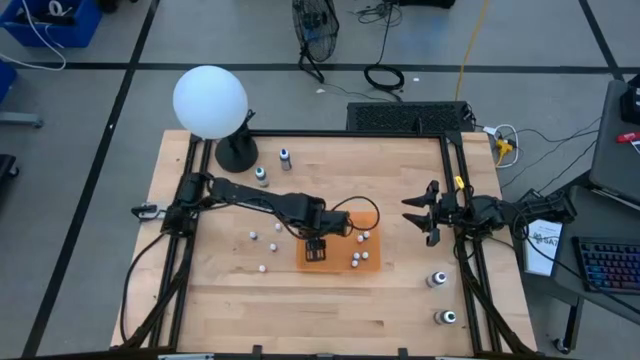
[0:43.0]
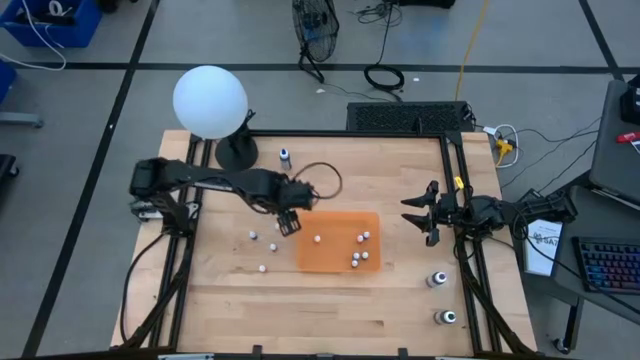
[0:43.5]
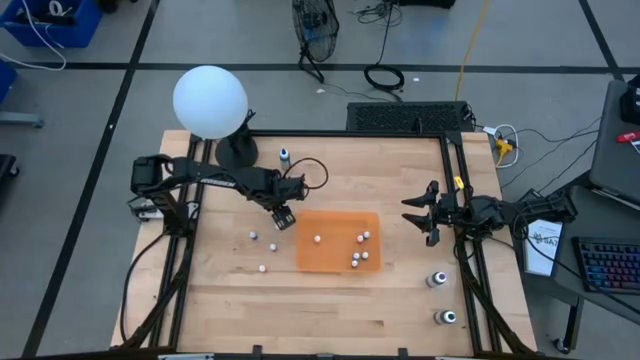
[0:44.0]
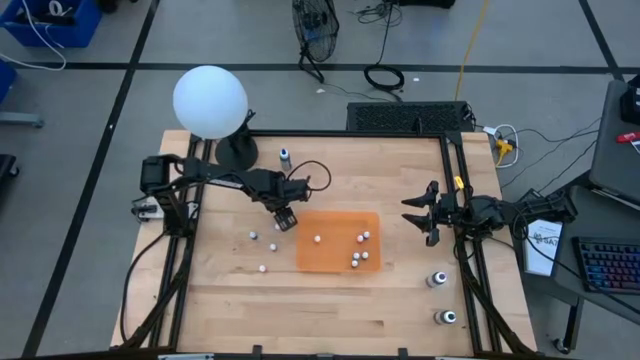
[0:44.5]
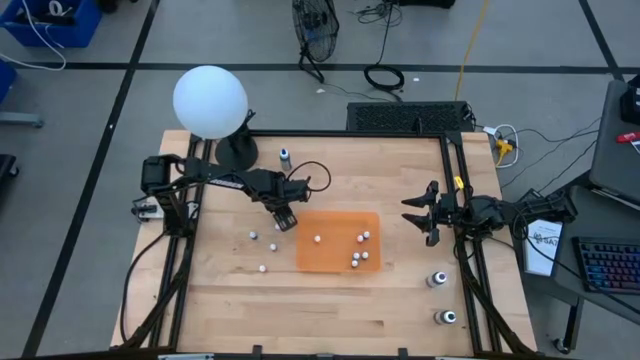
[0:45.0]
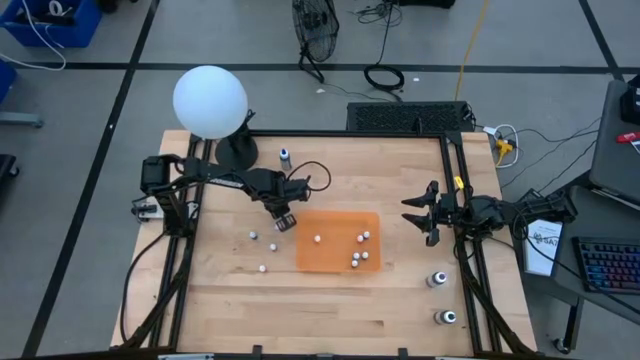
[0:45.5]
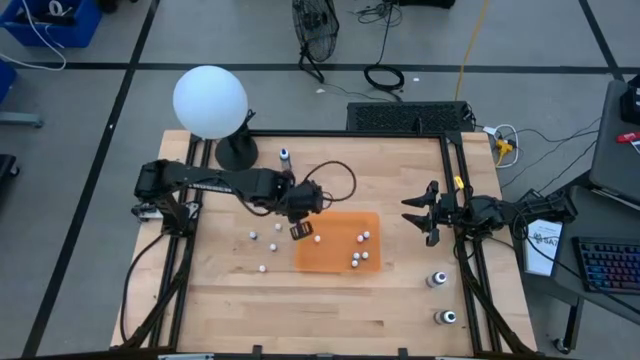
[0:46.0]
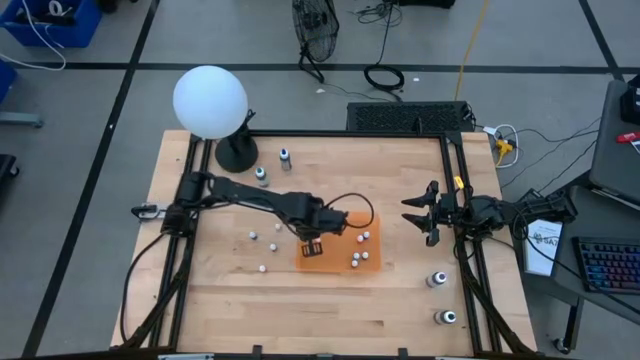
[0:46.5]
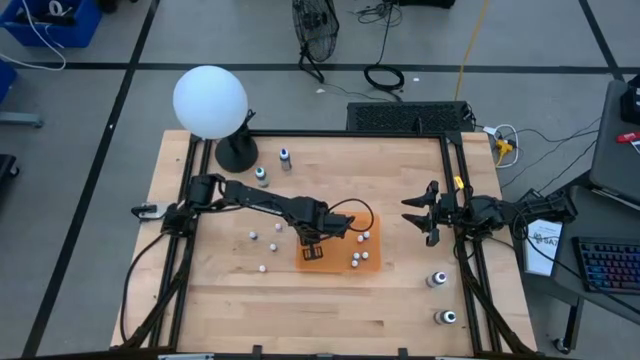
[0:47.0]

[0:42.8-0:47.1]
Task: Pick & Place food coloring
Put the small orange food coloring bottle into the container

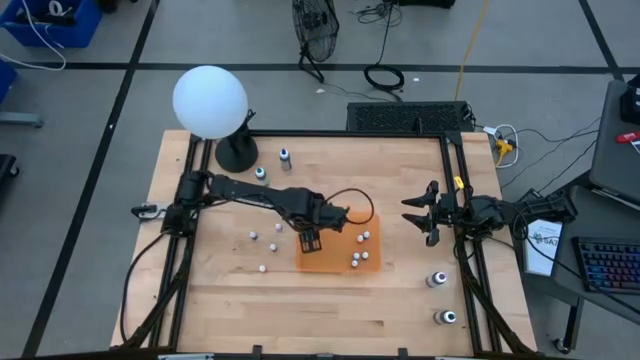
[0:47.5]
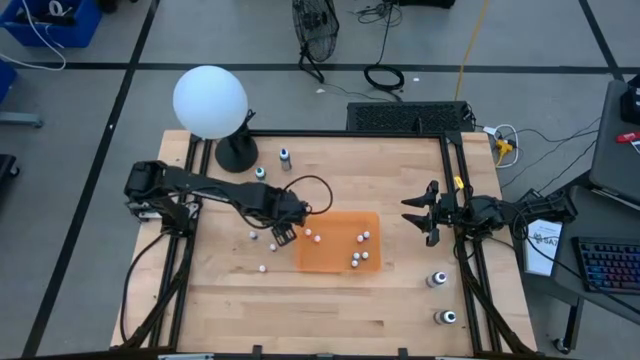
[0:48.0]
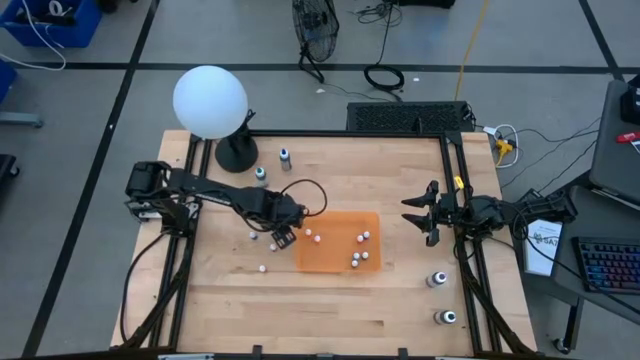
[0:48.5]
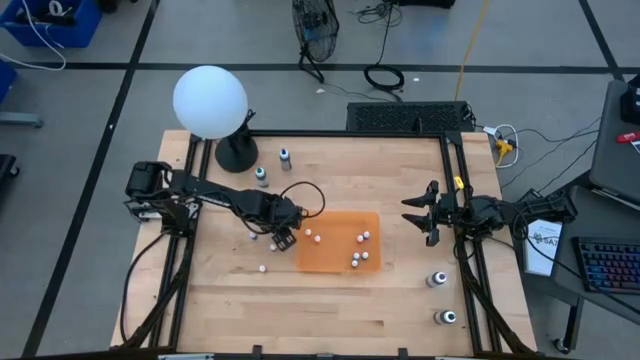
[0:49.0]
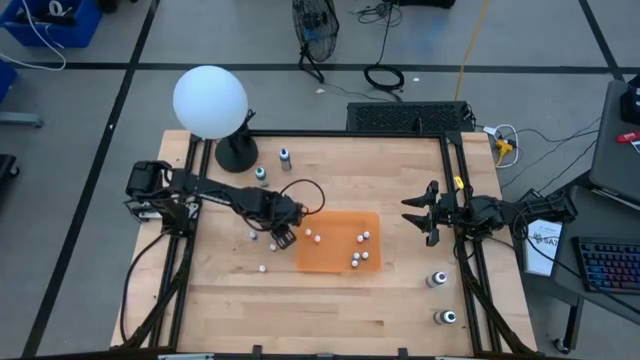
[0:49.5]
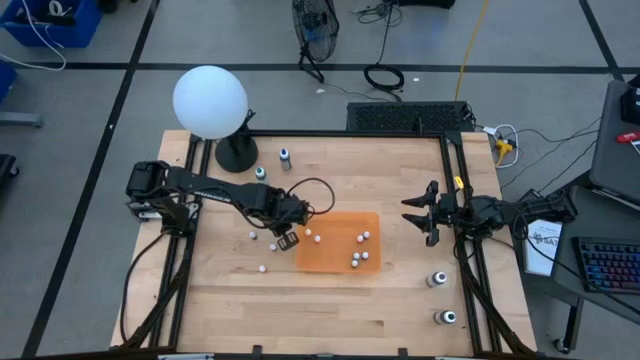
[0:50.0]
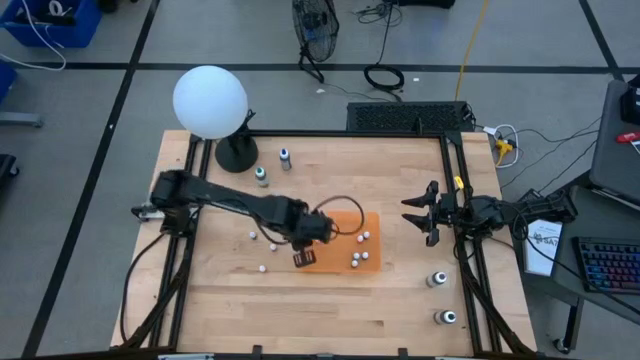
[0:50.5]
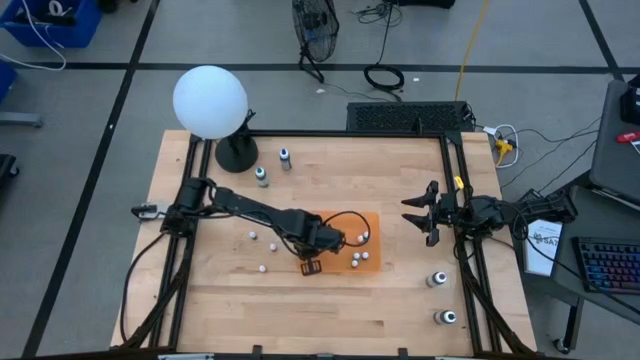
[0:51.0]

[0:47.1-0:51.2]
Put the small black food coloring bottle into the container

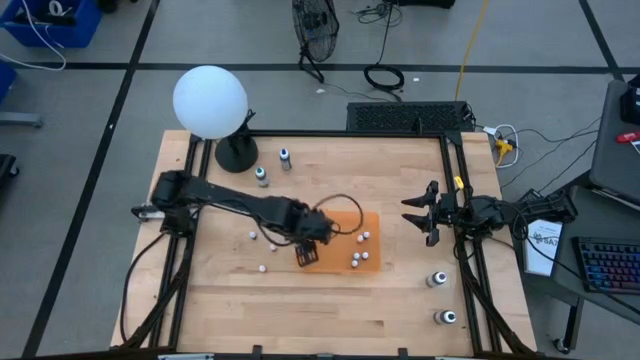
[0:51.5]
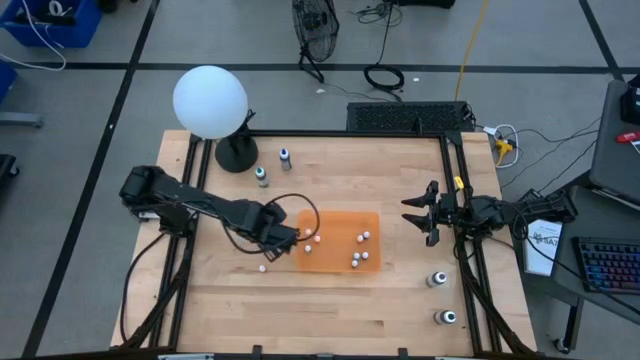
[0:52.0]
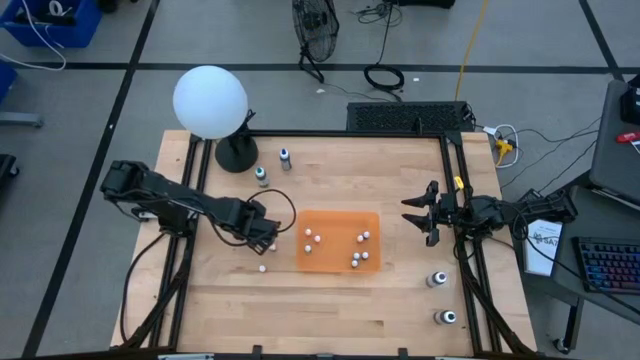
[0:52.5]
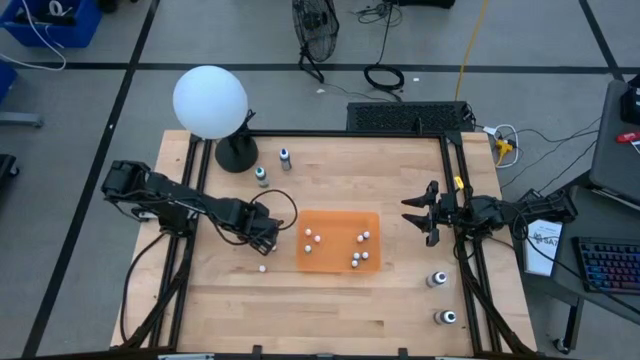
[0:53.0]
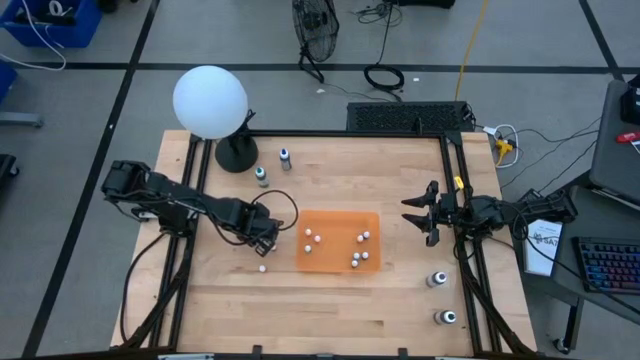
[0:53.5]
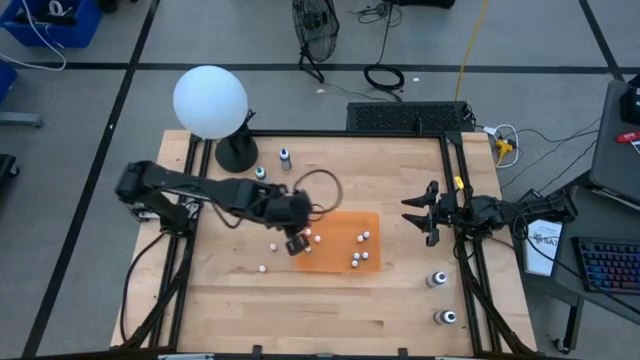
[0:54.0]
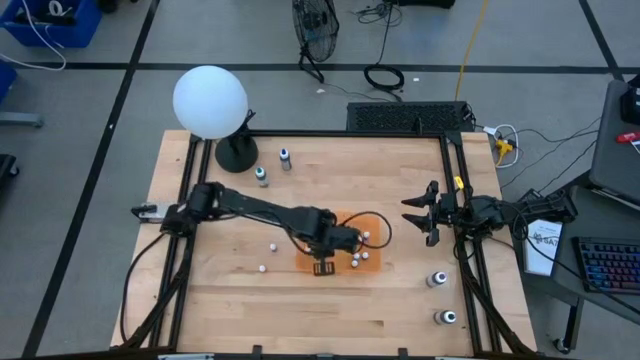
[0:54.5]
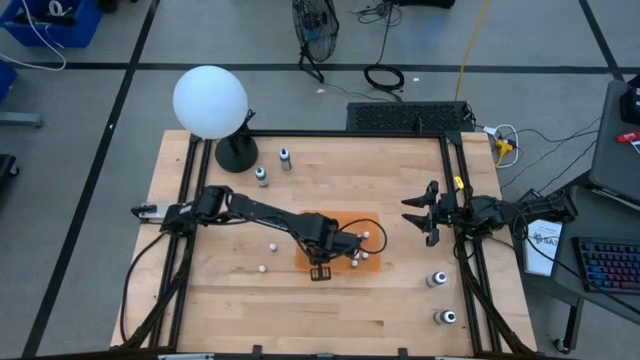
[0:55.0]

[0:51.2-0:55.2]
Put the small violet food coloring bottle into the container

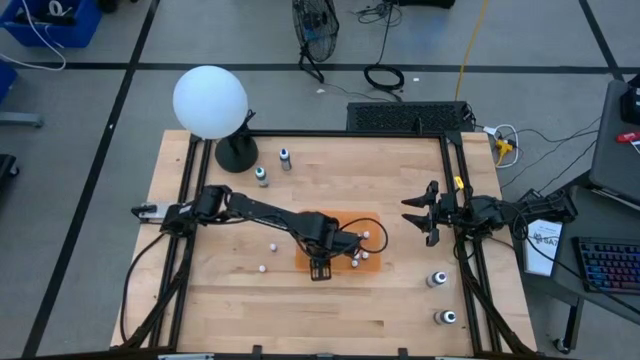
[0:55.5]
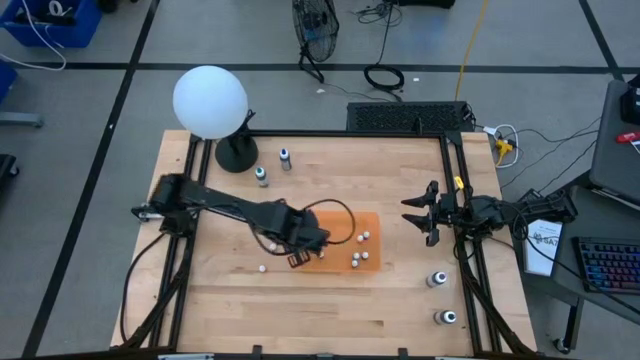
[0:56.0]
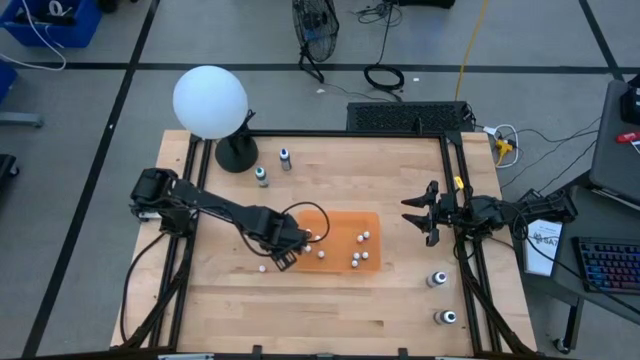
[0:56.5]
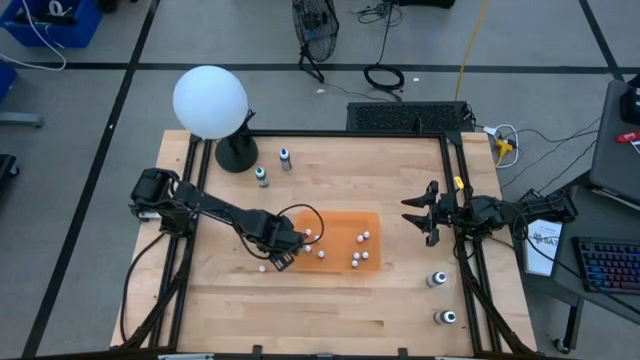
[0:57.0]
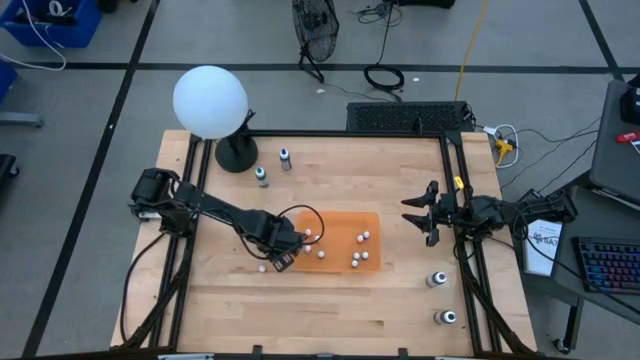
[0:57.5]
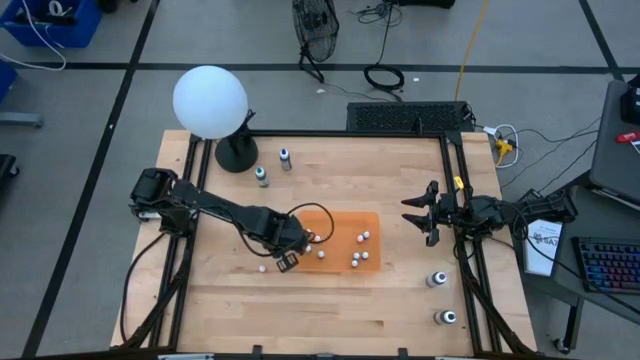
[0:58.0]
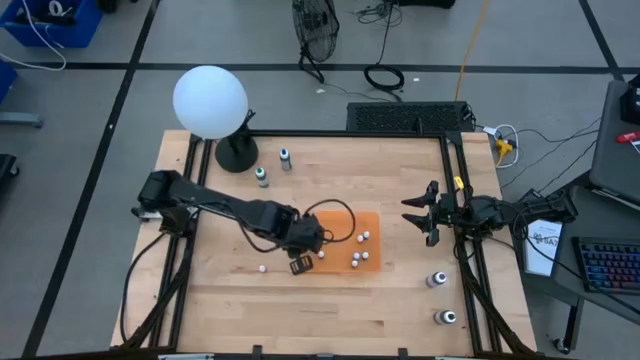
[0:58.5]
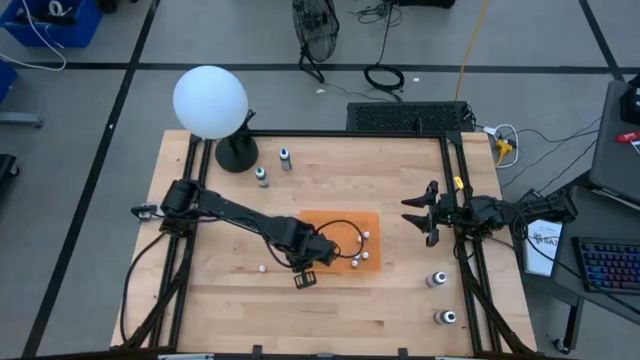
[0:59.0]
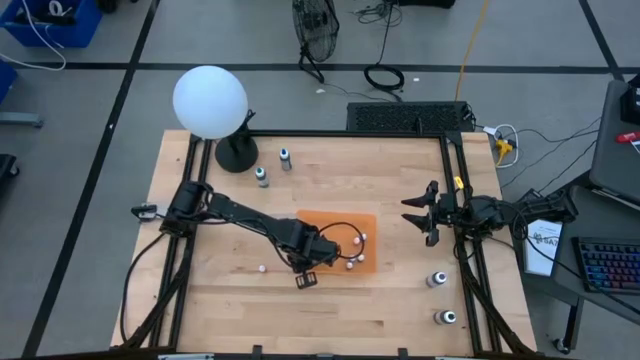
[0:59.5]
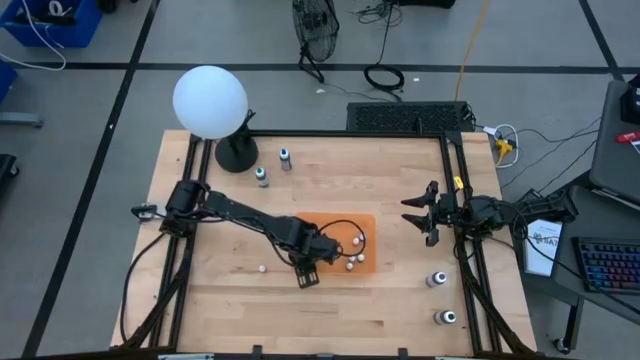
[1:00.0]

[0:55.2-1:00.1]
Put the small pink food coloring bottle into the container

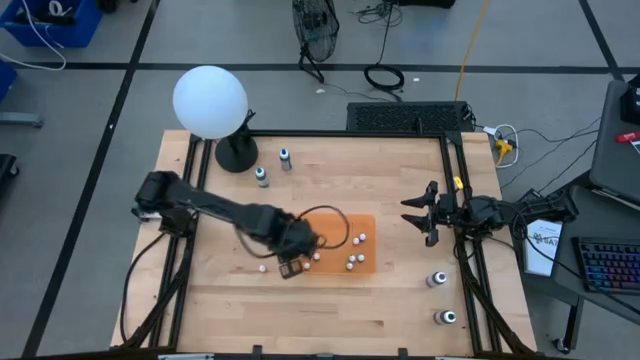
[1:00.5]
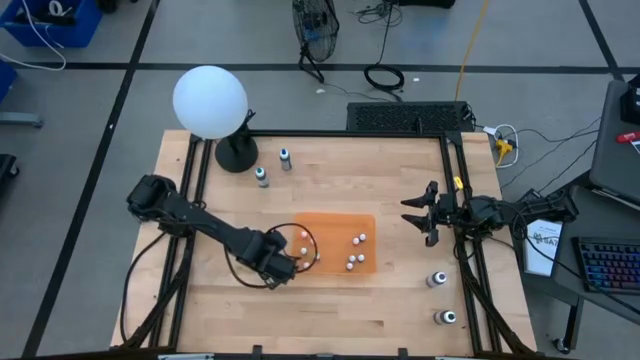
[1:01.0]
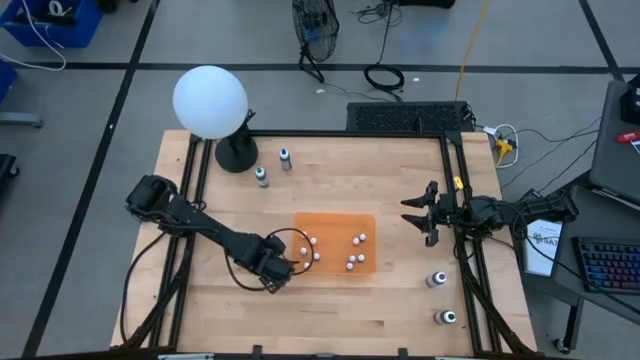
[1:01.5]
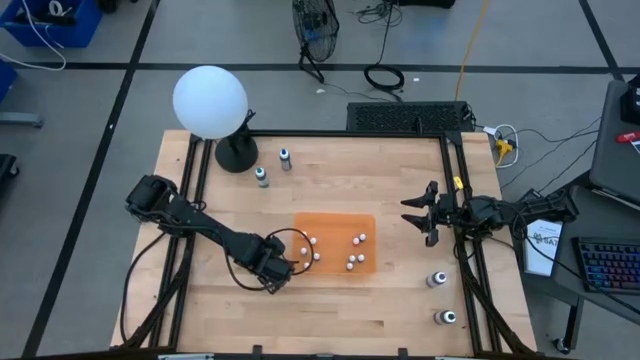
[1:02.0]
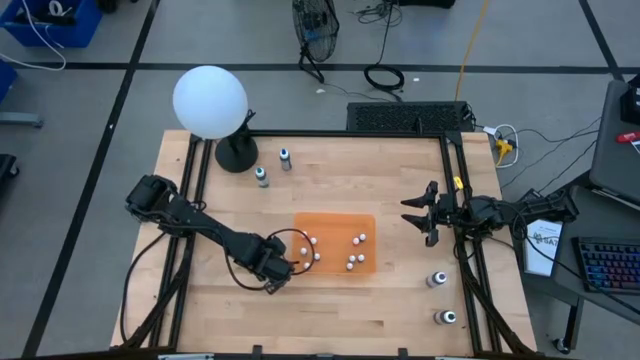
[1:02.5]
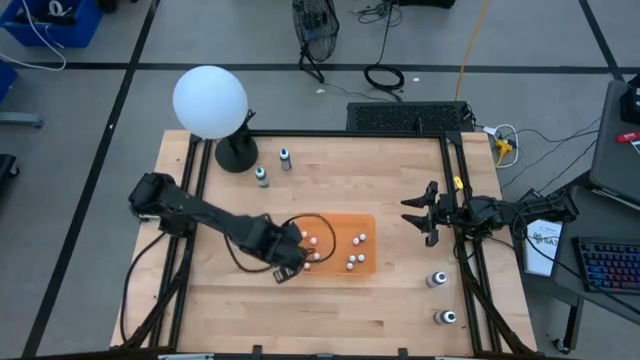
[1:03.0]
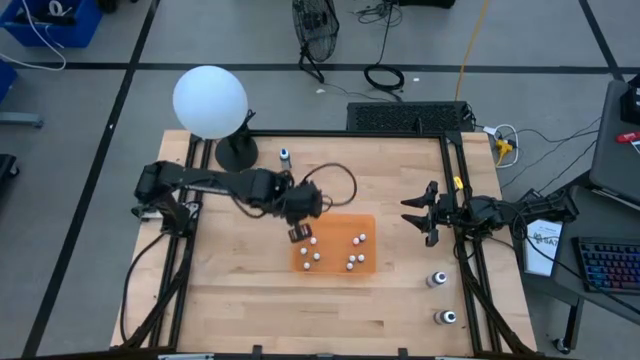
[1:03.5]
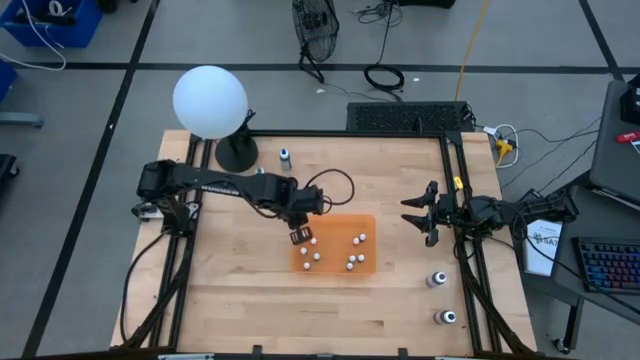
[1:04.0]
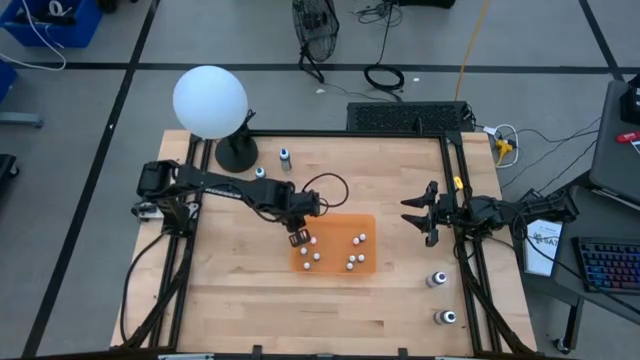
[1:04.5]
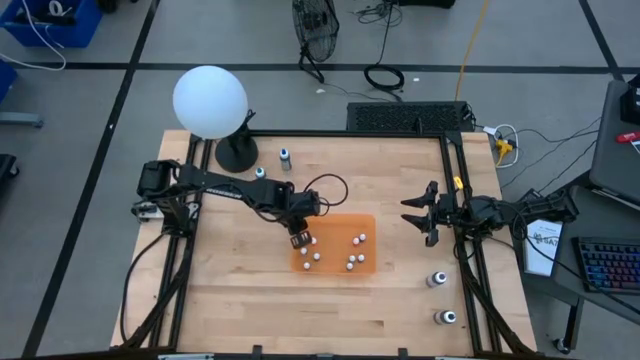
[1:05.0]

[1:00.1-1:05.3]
Put the small orange food coloring bottle into the container
